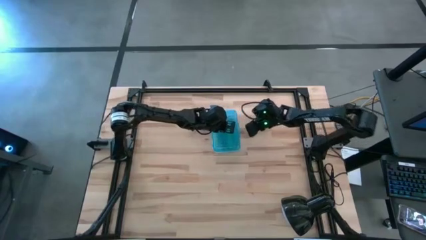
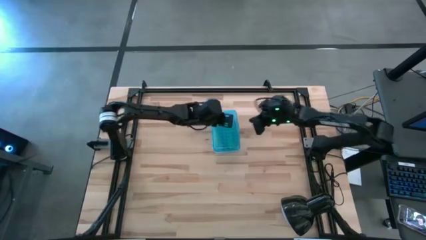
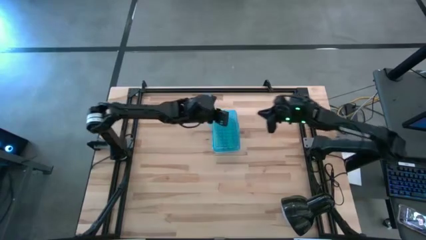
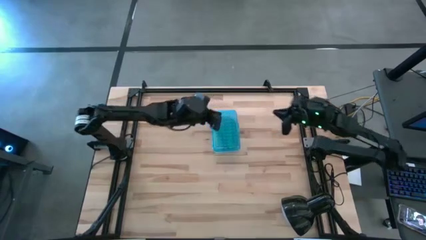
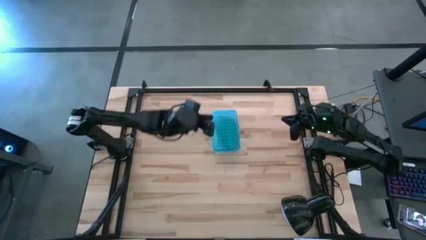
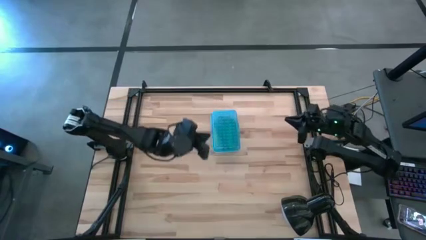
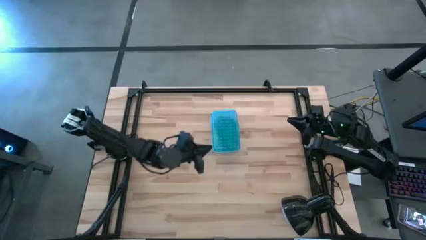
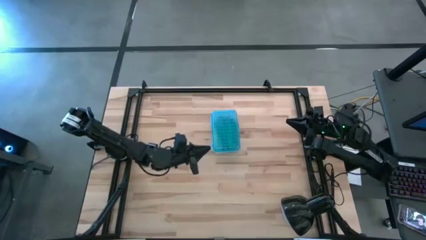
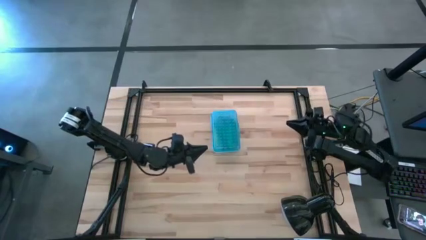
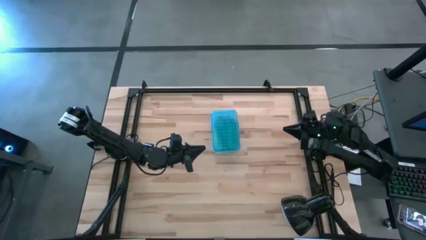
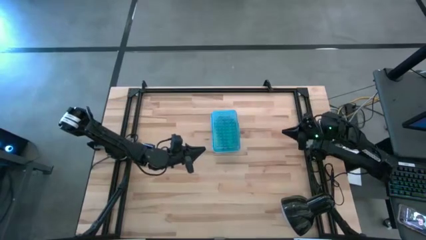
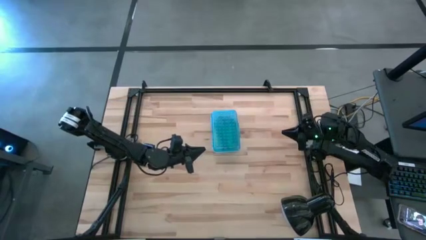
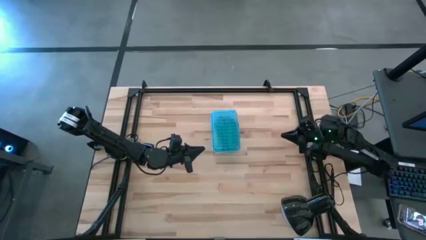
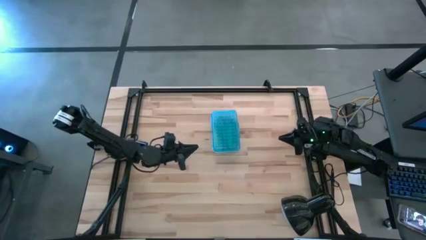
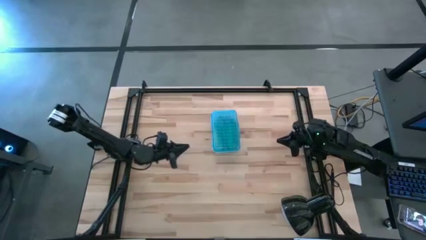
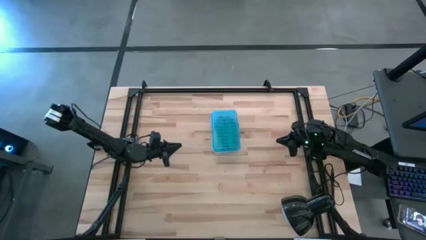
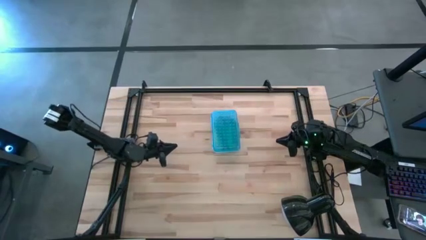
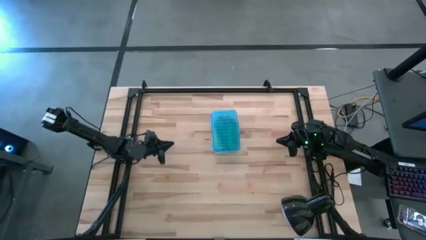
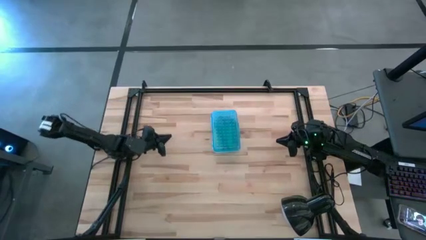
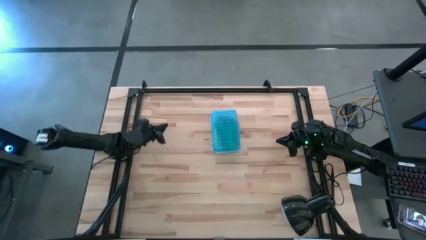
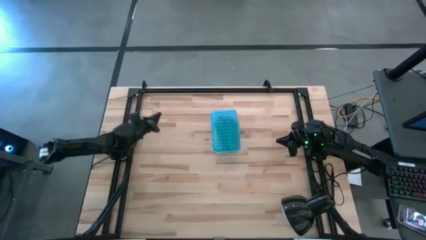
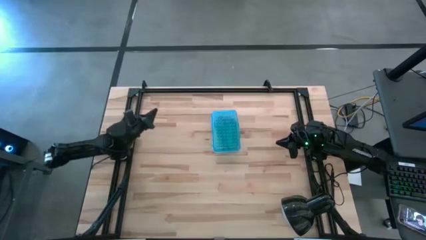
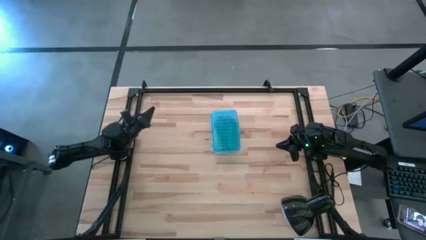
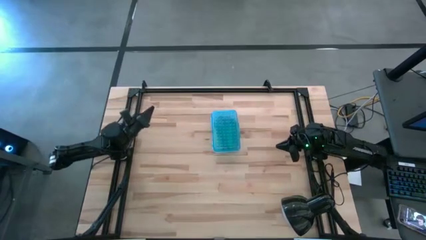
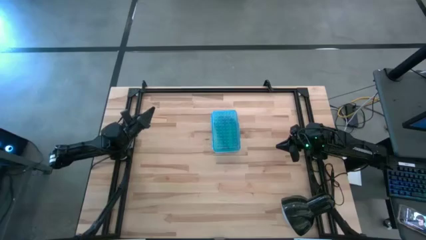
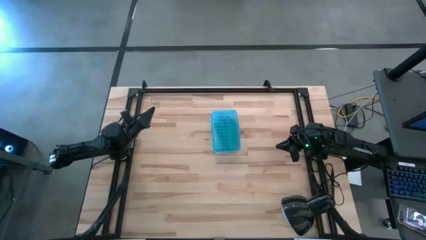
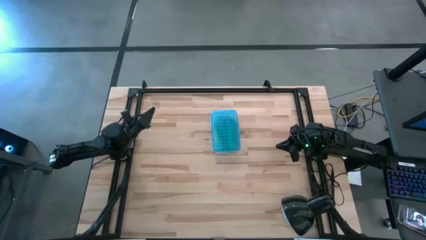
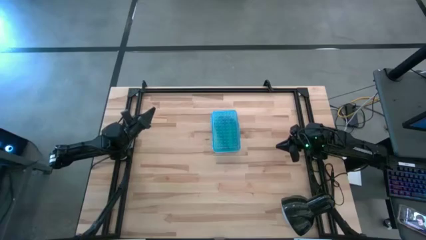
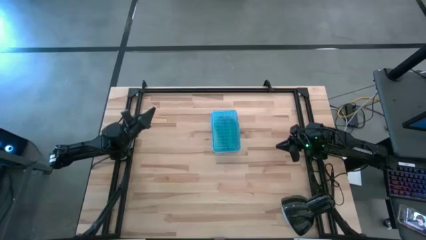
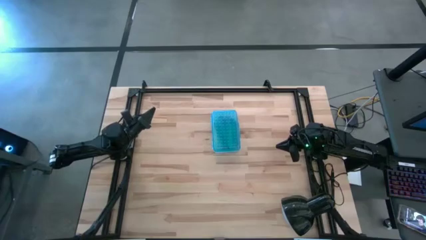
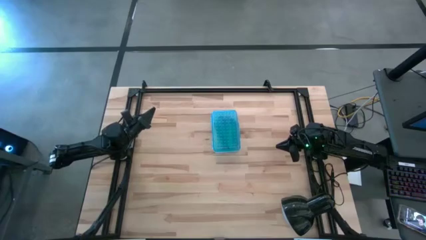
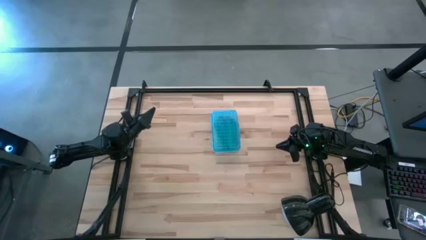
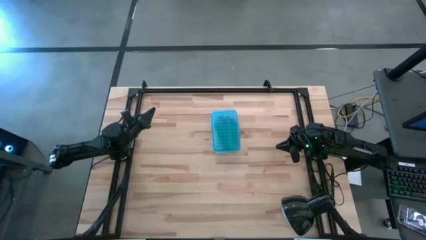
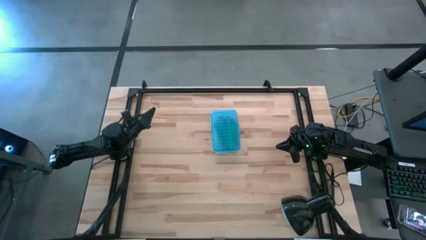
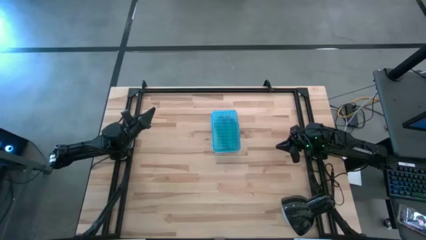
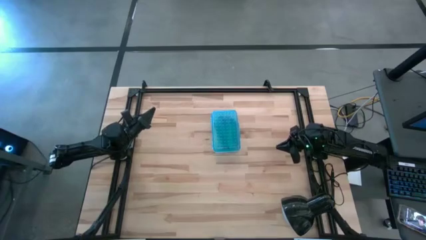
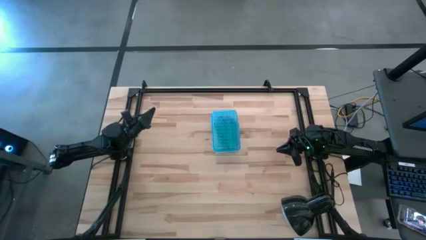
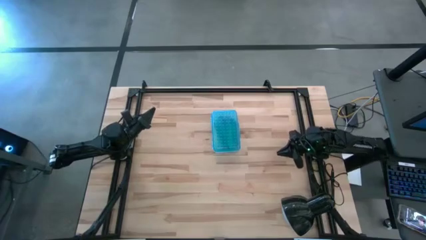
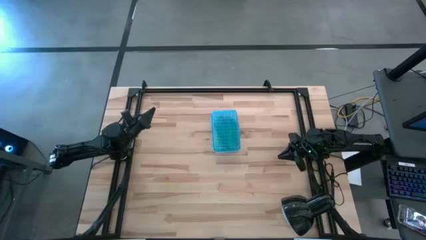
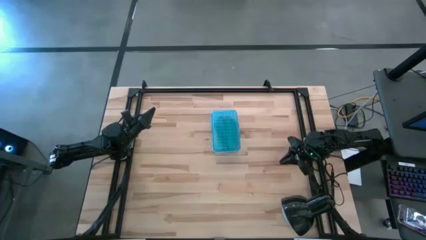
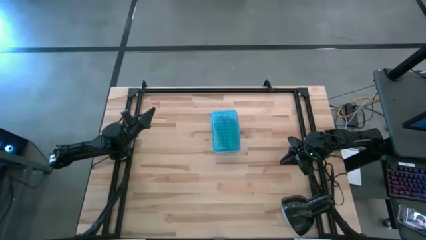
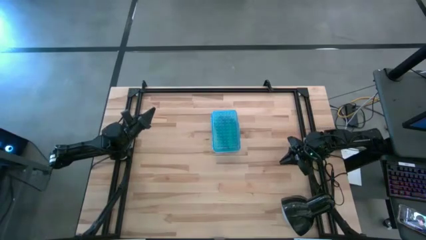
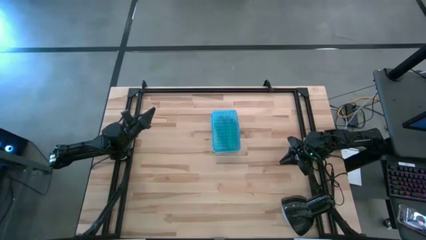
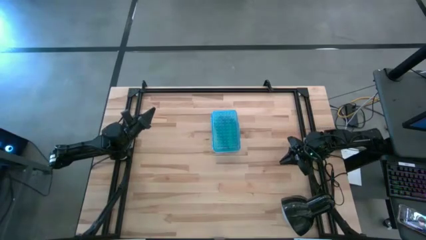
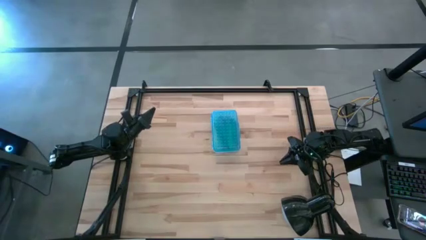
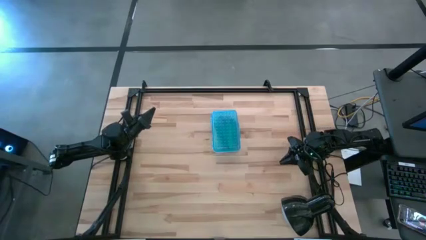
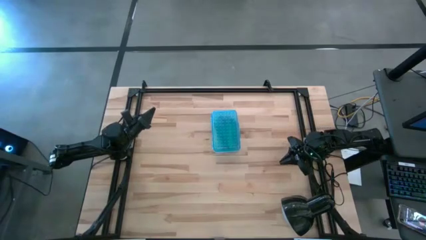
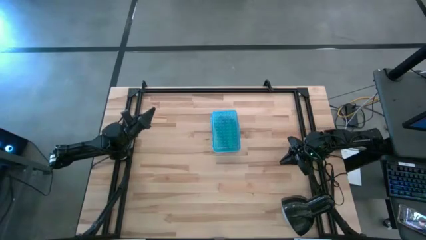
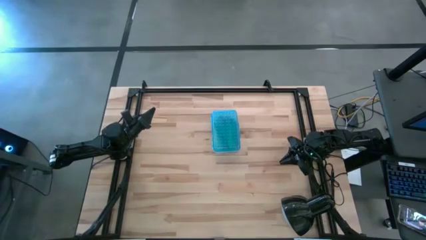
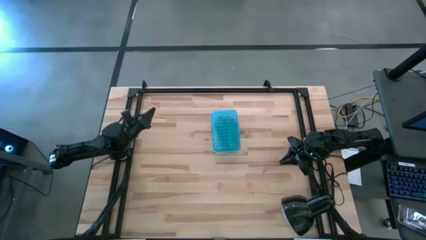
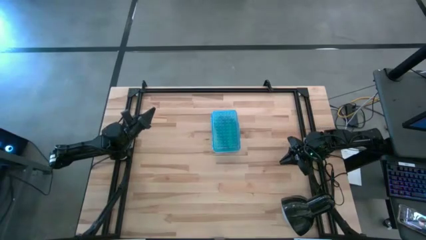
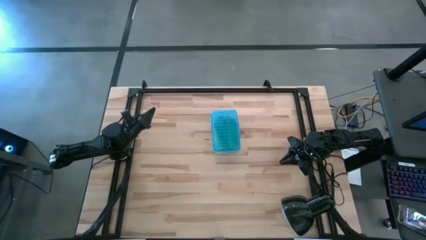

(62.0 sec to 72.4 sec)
Task: Pick & place school supplies into a supply box
Return to Home Position

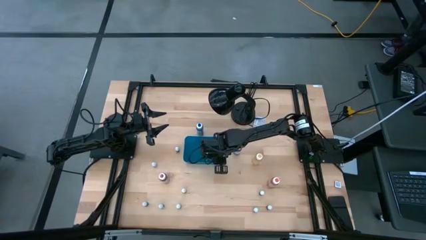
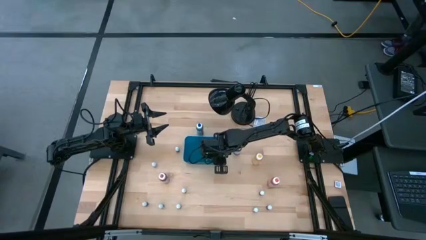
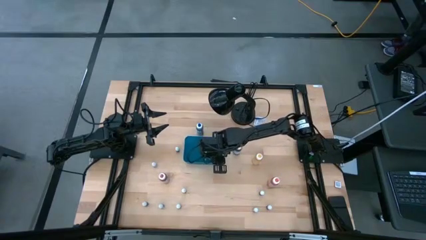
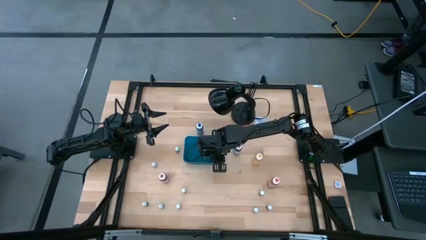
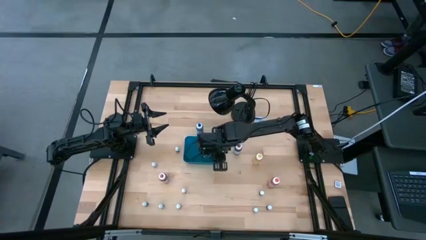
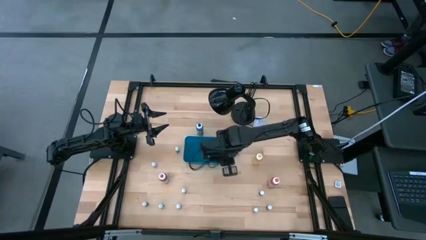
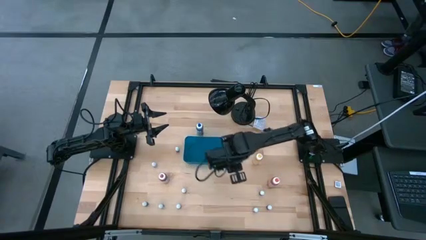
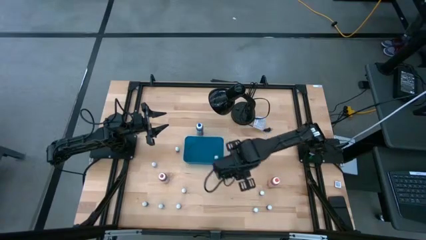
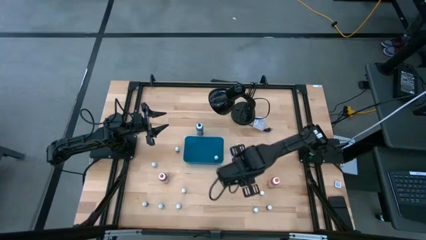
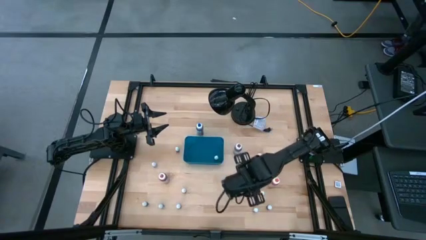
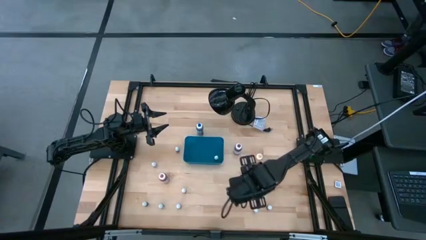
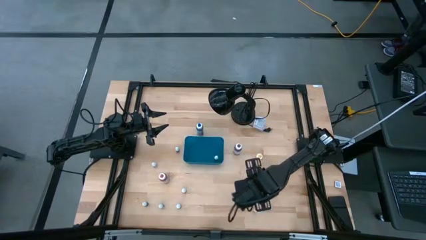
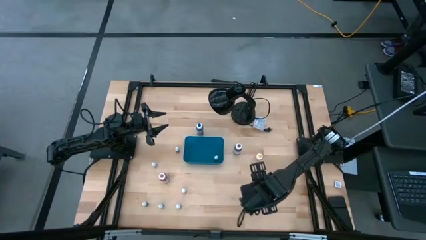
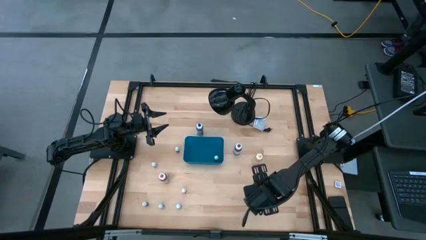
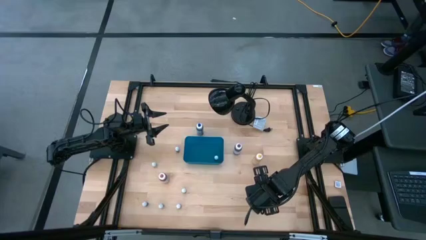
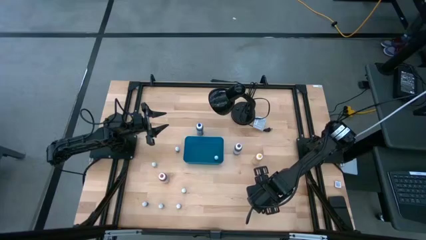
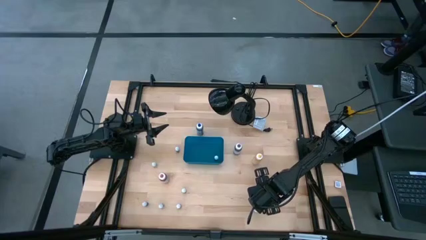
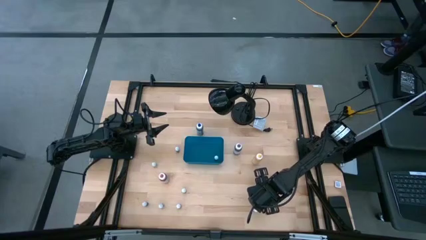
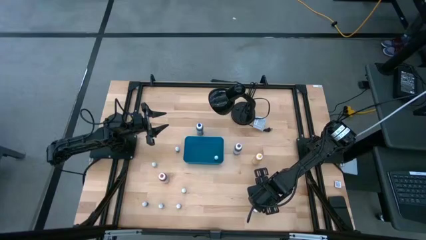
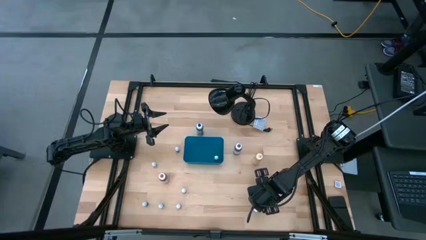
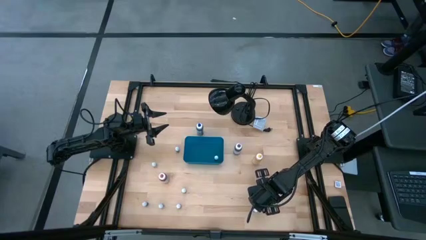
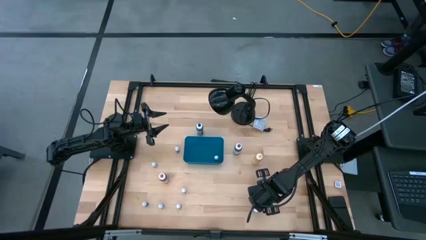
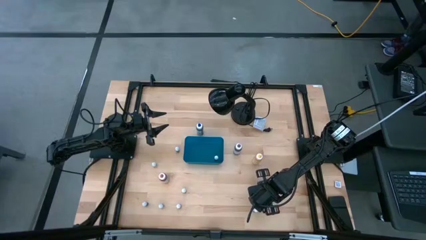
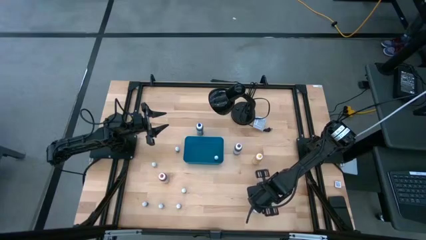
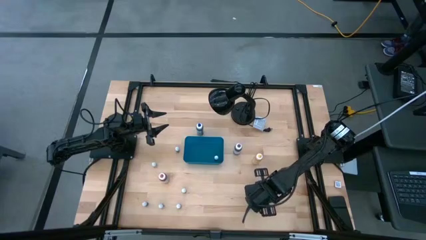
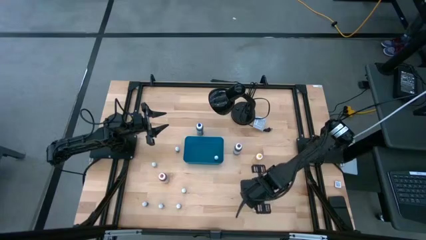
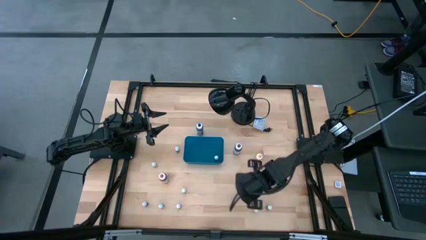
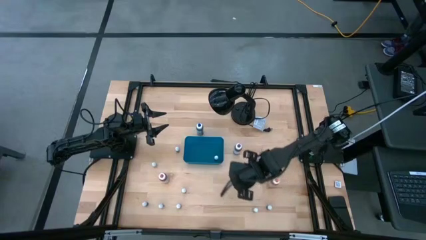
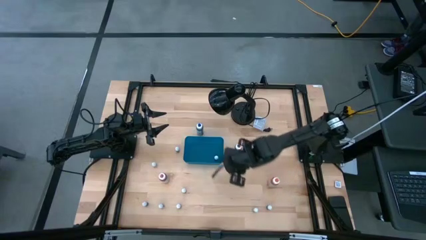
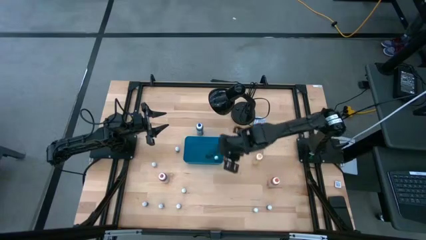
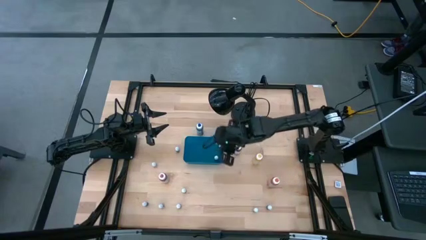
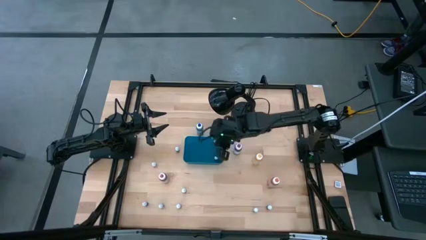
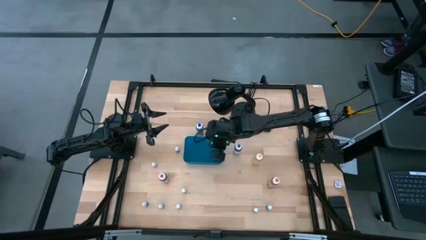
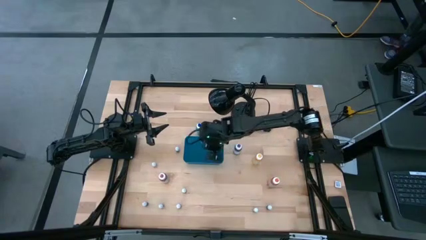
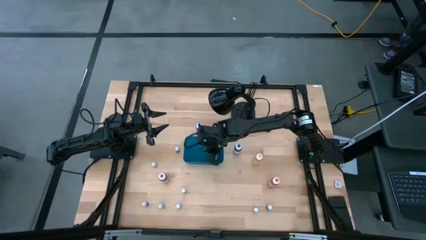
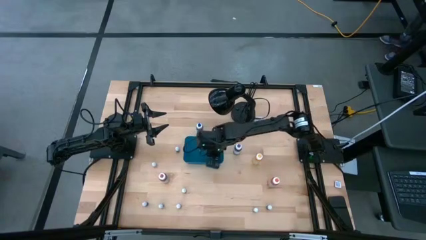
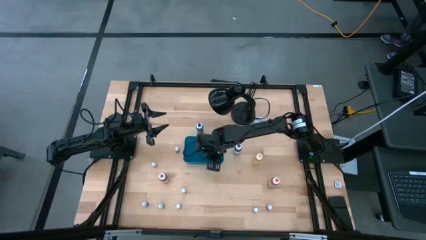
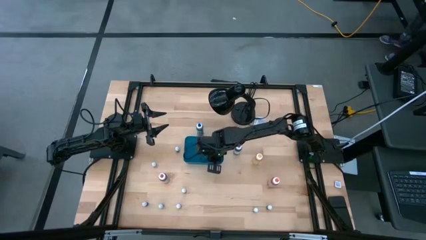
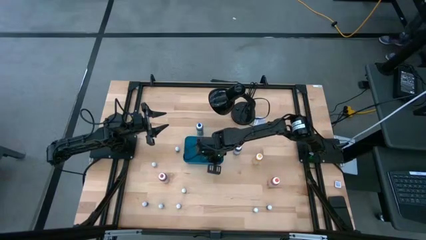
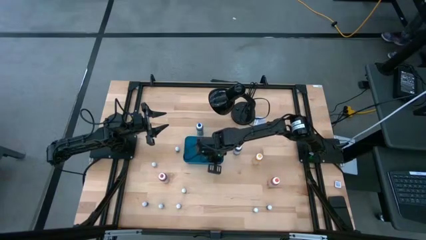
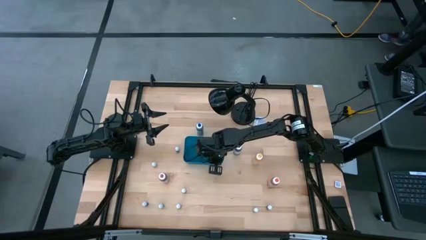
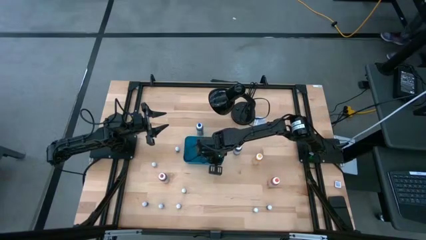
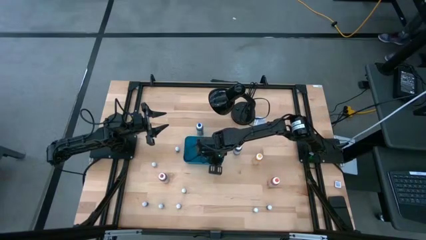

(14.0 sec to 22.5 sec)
Task: Pick & Place food coloring
Put the small dark green food coloring bottle into the blue bin
